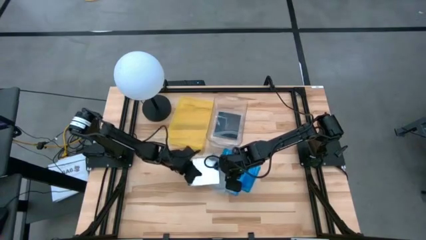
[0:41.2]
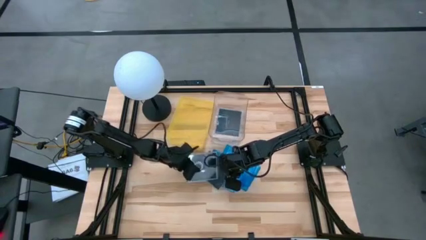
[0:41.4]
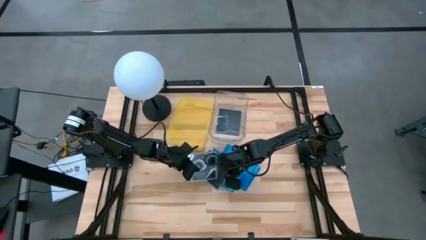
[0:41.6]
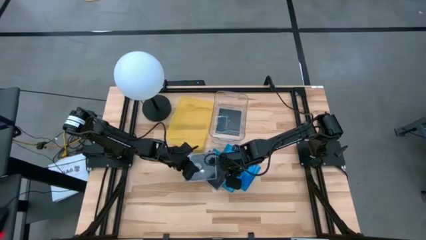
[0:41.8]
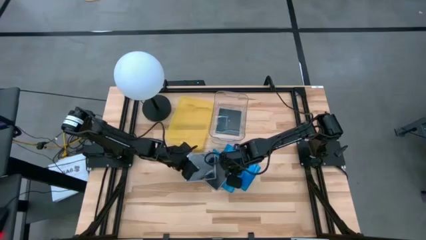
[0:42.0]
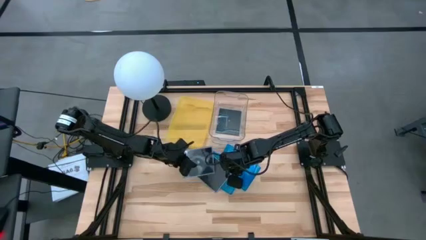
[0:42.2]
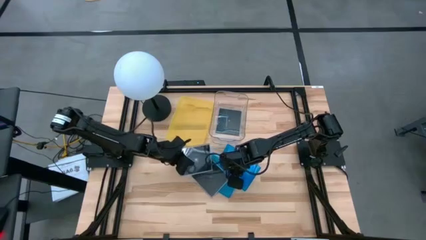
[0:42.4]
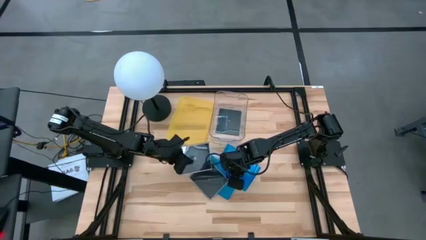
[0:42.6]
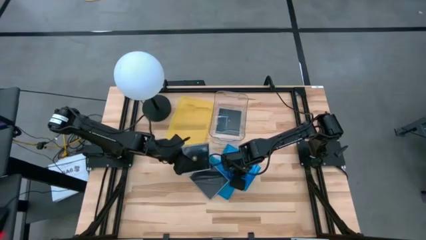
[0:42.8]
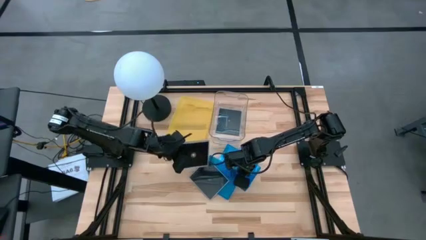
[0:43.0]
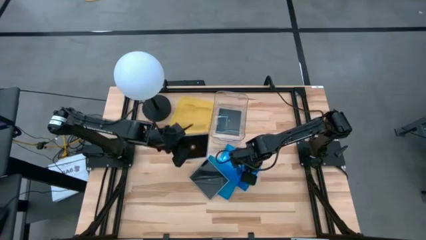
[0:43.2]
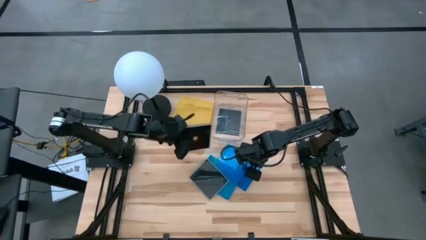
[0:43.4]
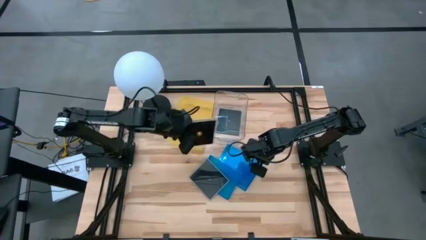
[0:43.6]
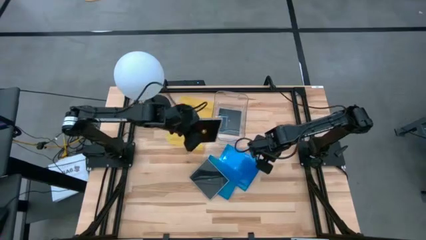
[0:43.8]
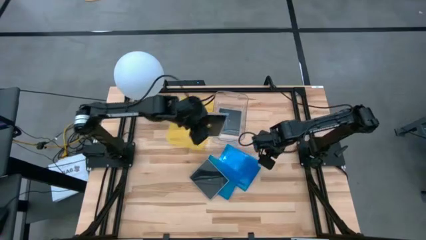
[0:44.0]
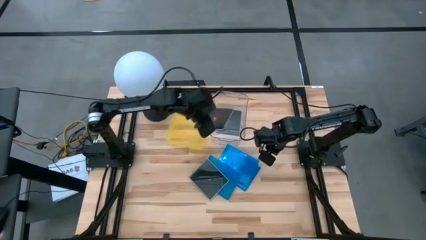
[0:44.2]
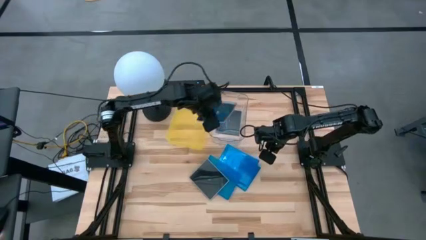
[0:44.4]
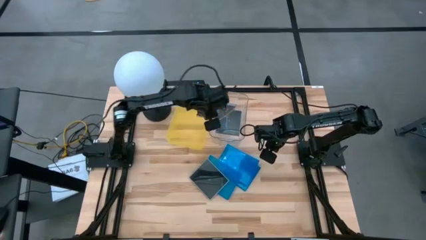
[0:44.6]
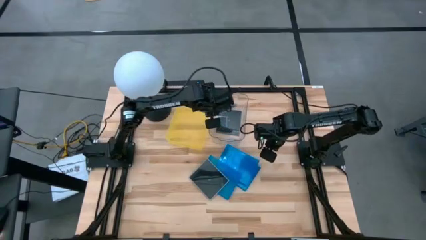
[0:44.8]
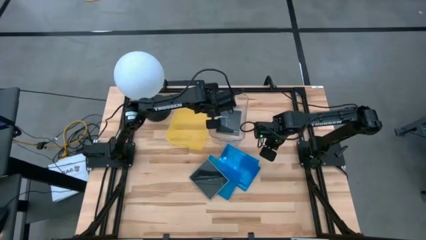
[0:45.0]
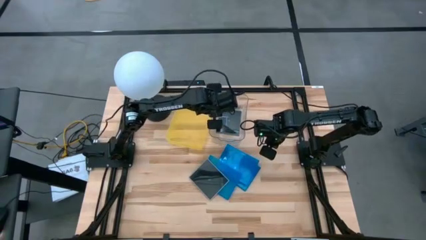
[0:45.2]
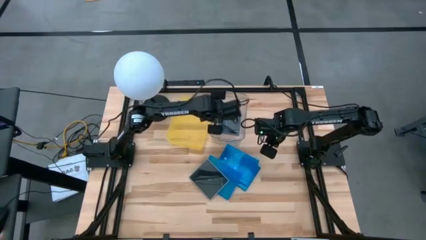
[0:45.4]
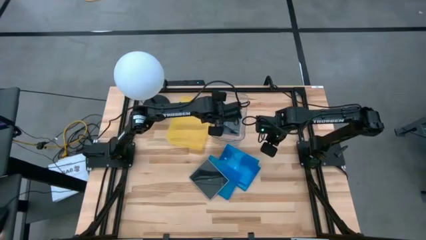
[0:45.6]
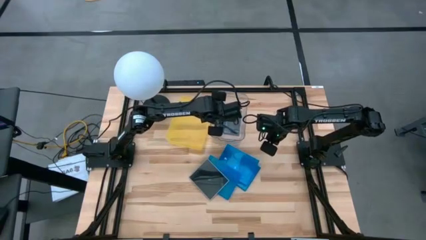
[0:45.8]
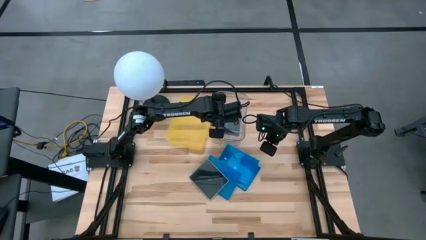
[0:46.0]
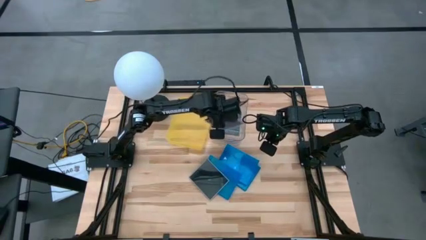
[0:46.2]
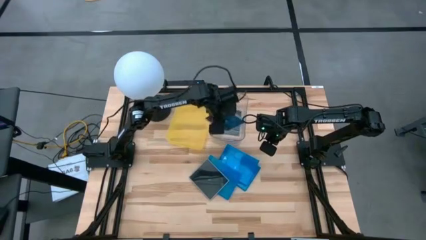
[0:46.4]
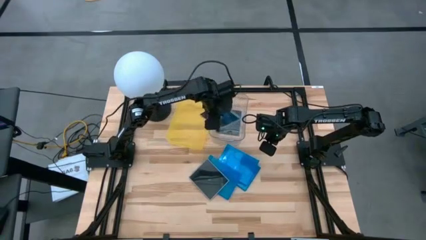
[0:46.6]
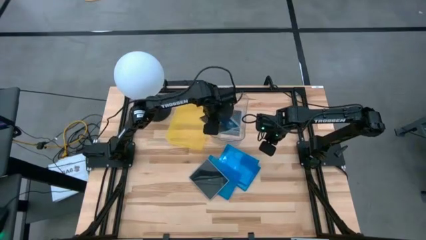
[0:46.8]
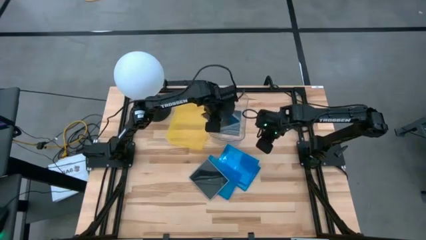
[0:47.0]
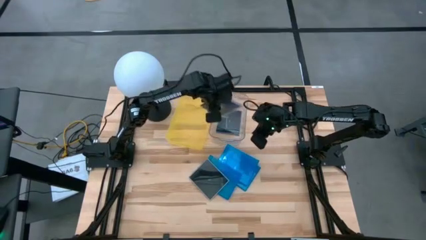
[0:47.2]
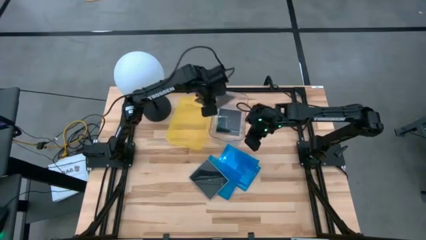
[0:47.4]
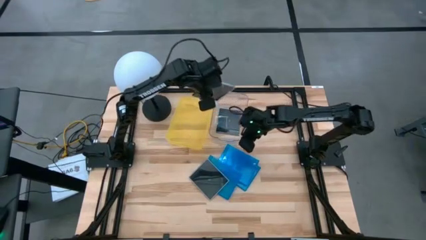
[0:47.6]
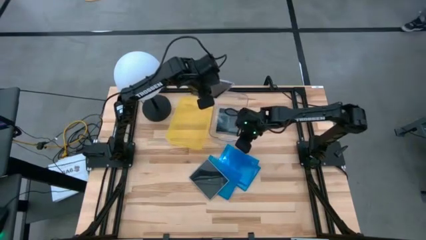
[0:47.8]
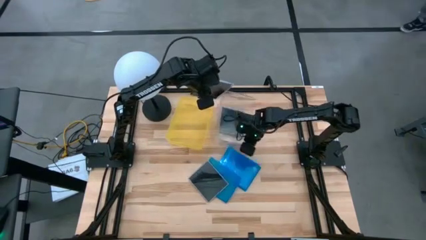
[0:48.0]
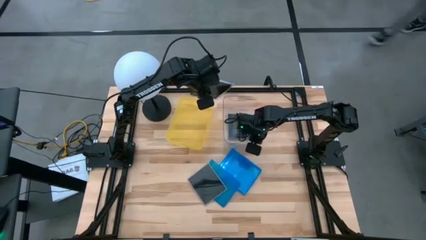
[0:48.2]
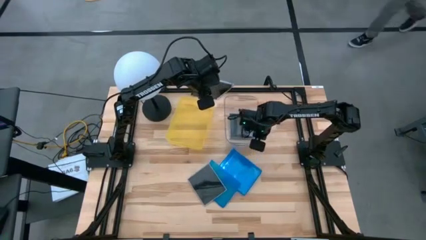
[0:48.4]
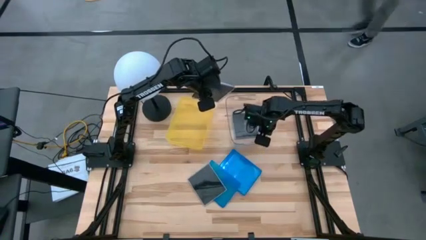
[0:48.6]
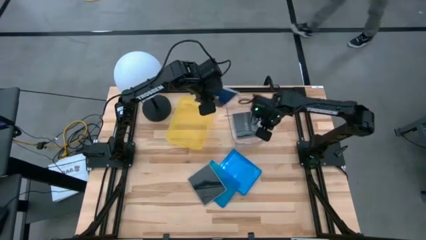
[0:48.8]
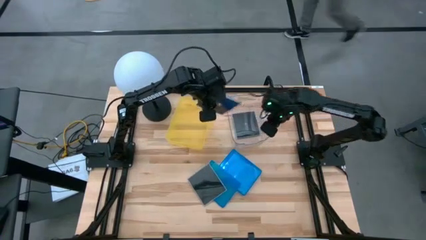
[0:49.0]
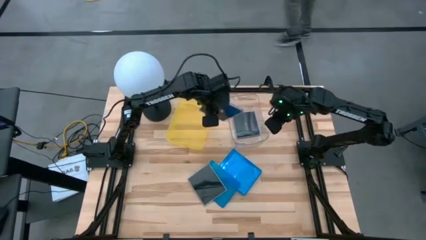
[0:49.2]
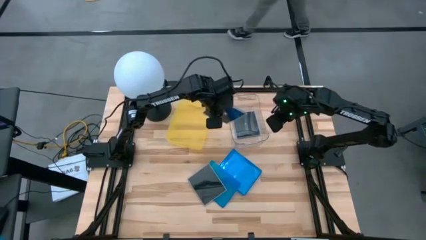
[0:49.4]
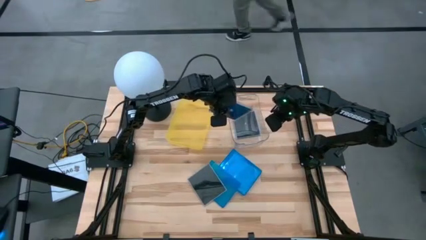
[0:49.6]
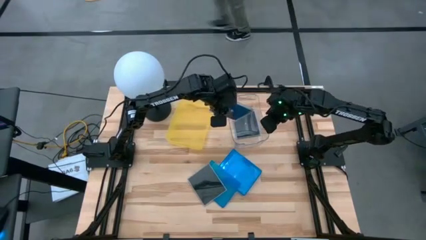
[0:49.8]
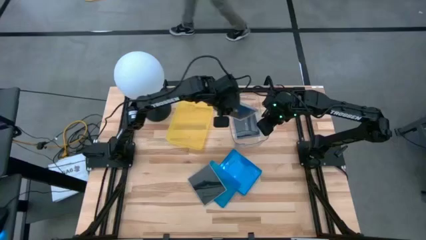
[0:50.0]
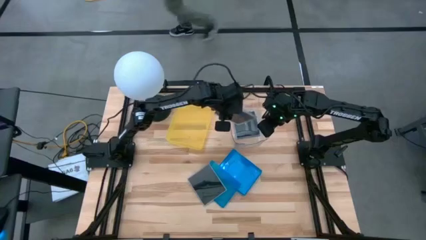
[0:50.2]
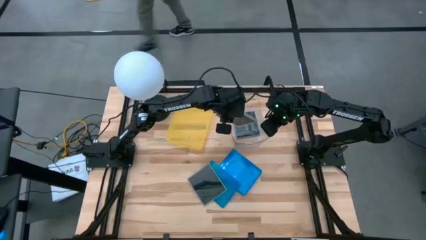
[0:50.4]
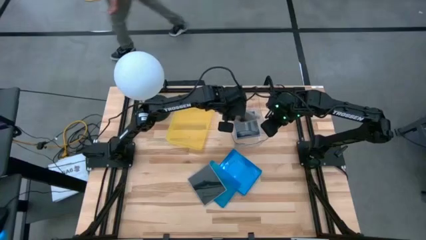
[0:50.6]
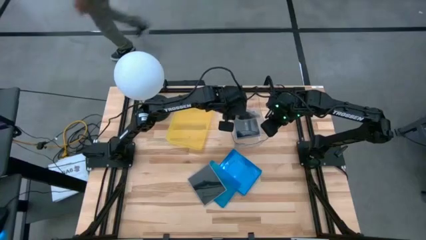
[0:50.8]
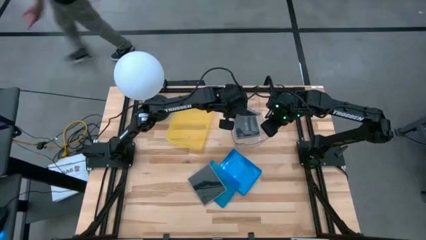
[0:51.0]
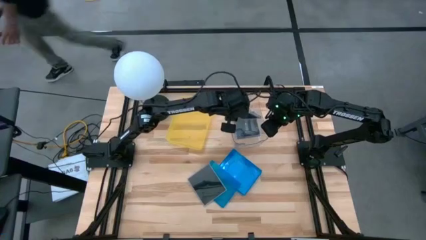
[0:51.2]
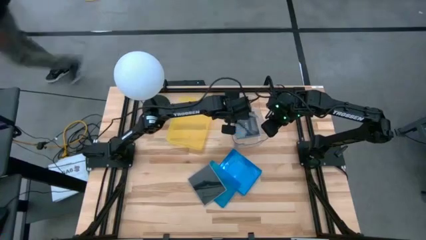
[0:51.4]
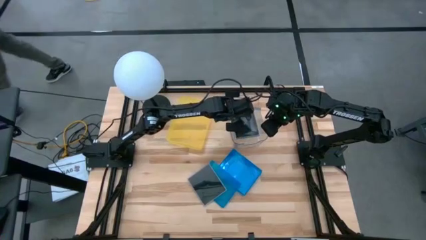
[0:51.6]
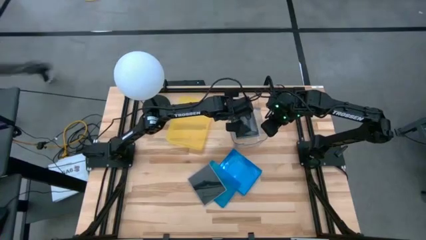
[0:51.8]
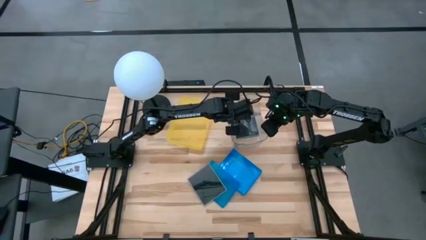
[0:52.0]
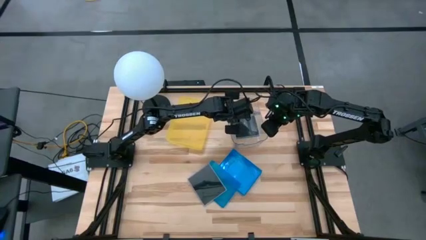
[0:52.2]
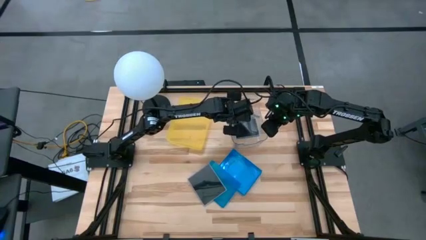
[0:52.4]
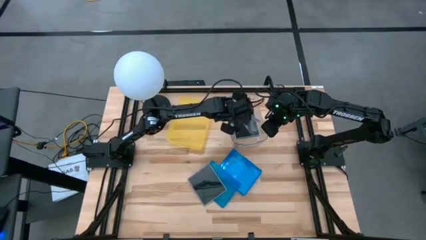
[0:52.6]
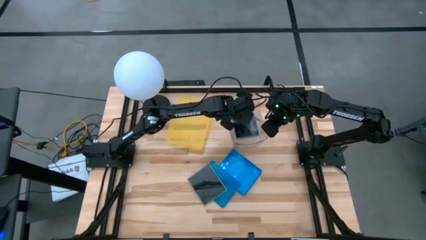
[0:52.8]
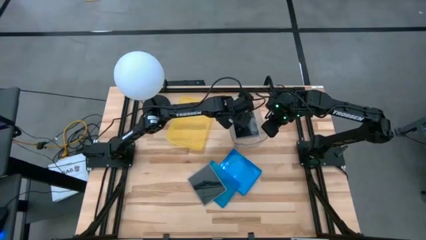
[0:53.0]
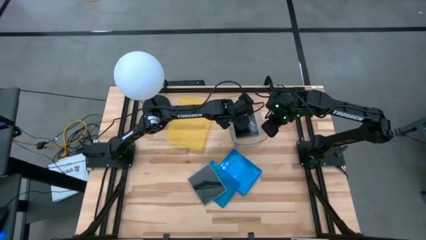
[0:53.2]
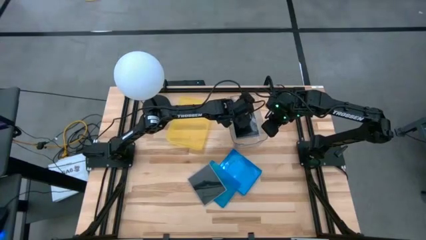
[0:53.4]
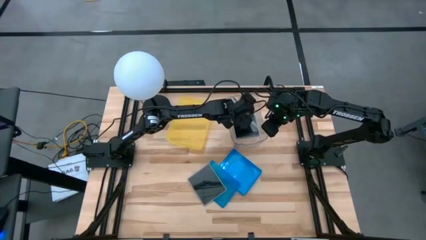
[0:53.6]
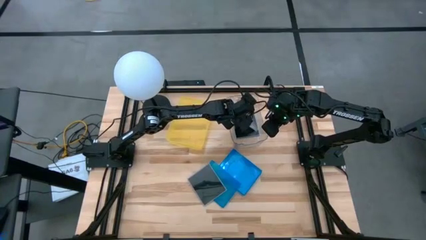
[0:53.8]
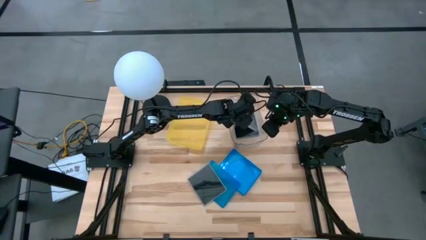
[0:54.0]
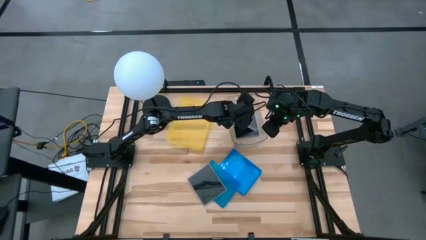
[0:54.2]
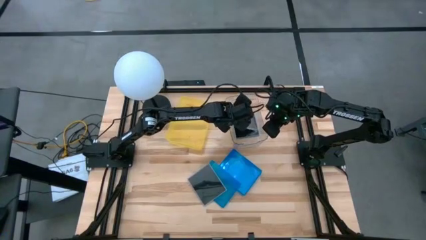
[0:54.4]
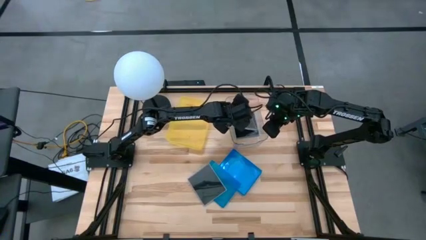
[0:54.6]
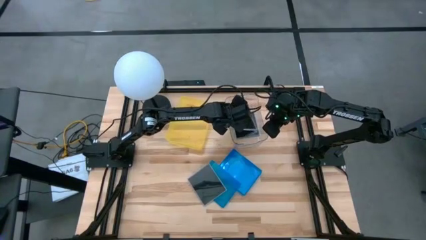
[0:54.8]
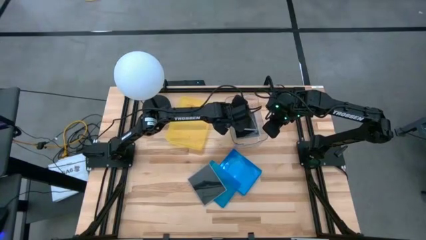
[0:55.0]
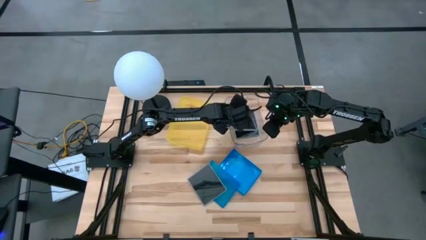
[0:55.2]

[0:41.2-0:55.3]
Task: Pick & place jewel cases by type
Put the black CD case into the transparent bin

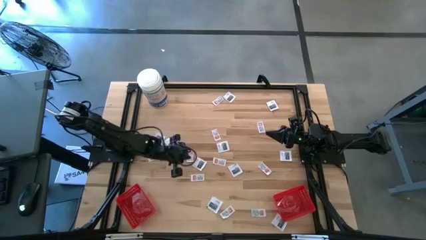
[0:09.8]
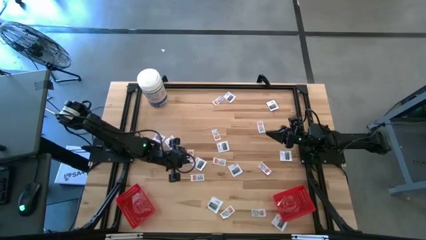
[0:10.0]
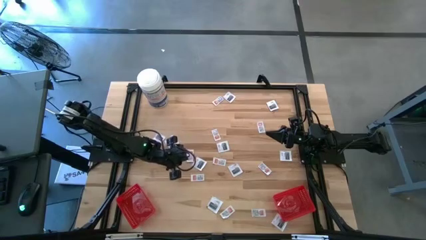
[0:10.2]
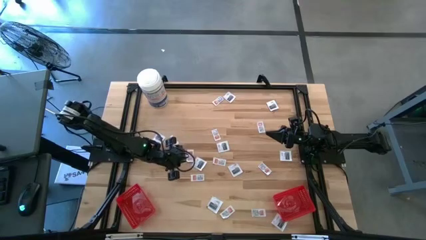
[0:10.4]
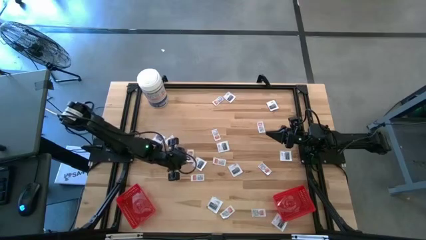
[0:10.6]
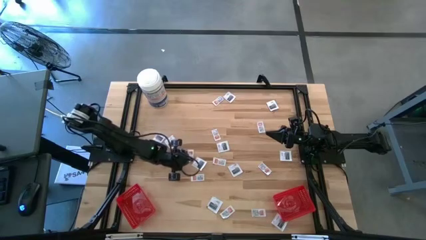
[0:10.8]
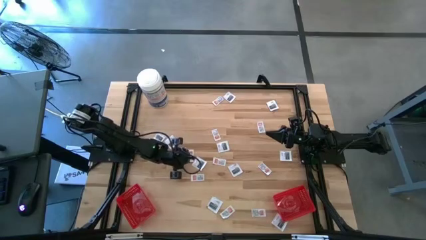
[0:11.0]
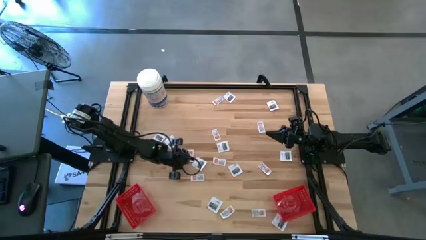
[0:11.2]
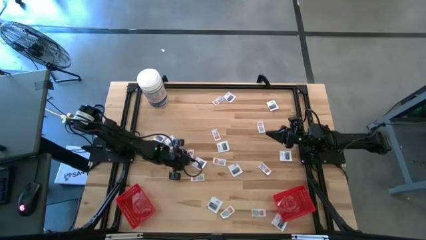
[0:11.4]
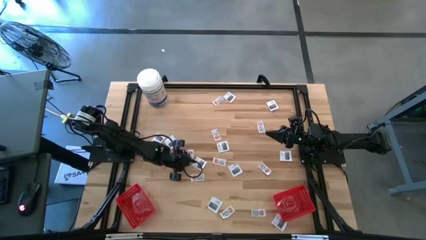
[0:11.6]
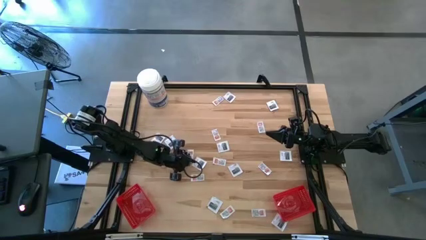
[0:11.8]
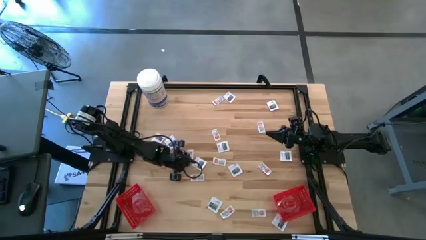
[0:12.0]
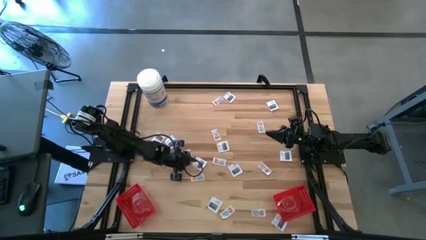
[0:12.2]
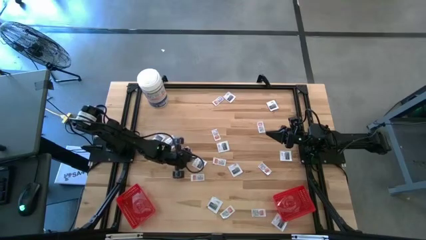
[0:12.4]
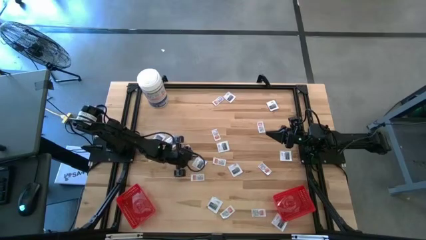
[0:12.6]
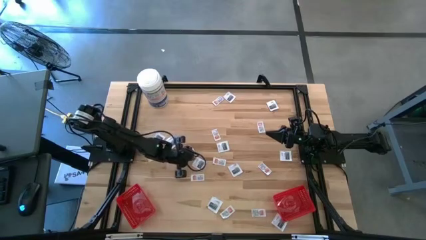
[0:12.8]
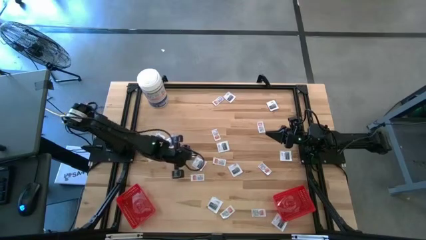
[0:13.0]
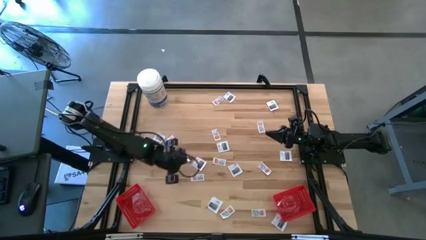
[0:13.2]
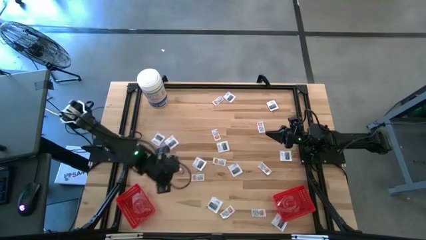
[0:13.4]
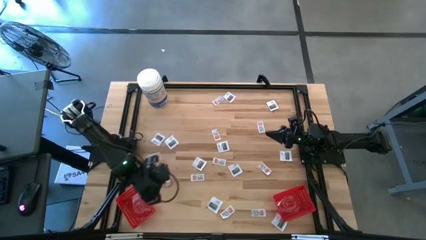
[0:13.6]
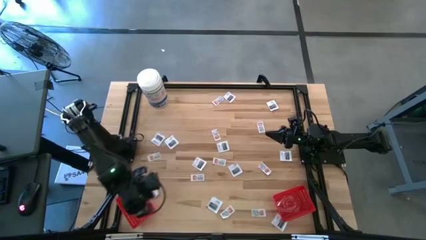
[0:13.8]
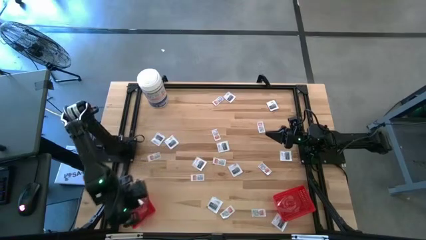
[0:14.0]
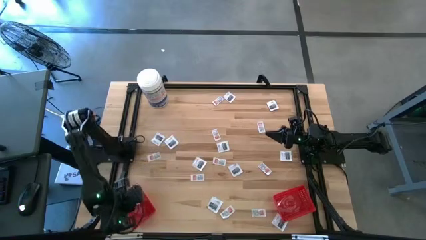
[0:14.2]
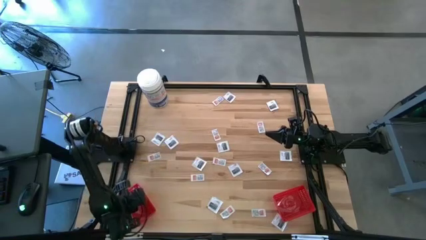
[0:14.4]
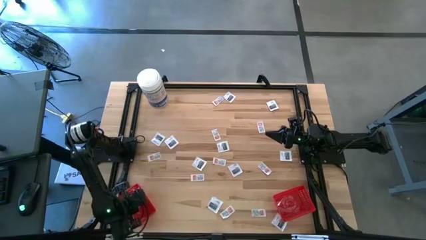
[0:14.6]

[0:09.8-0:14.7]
Task: Pick & Place First Aid Supplies
Put the ointment pack into the left red bin
